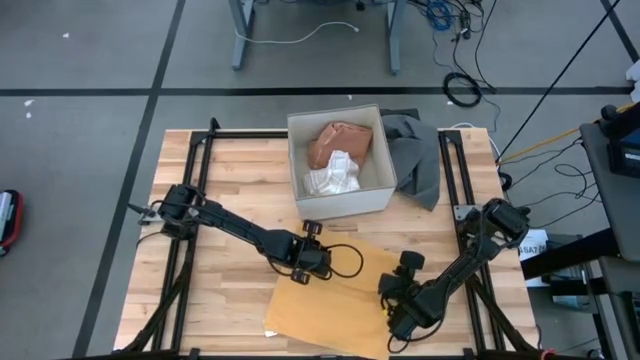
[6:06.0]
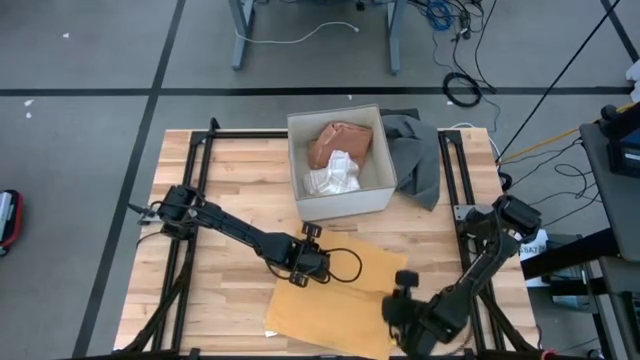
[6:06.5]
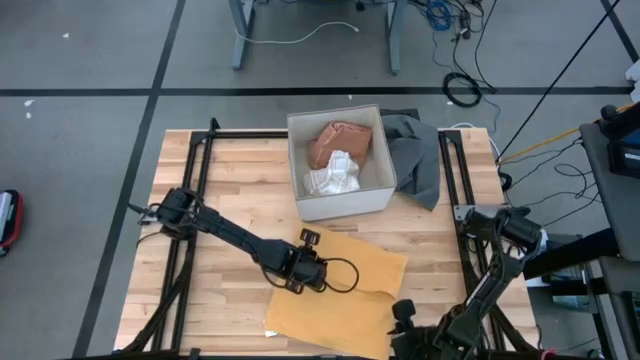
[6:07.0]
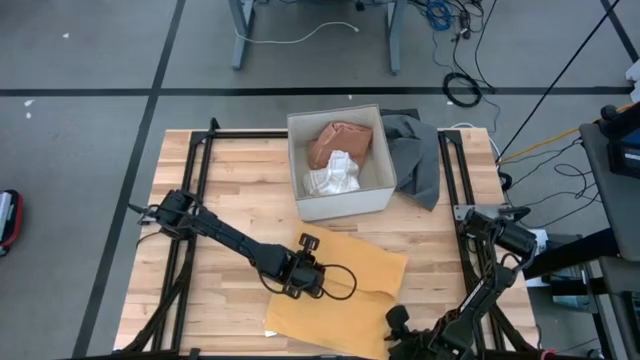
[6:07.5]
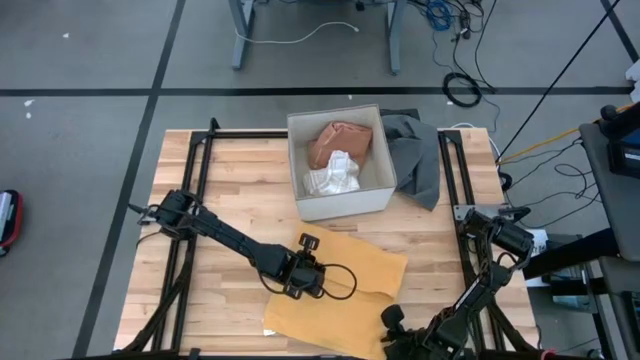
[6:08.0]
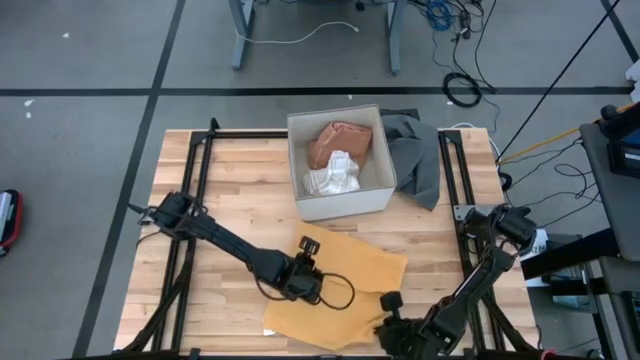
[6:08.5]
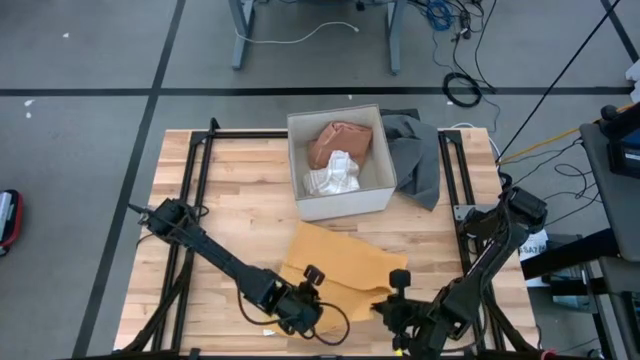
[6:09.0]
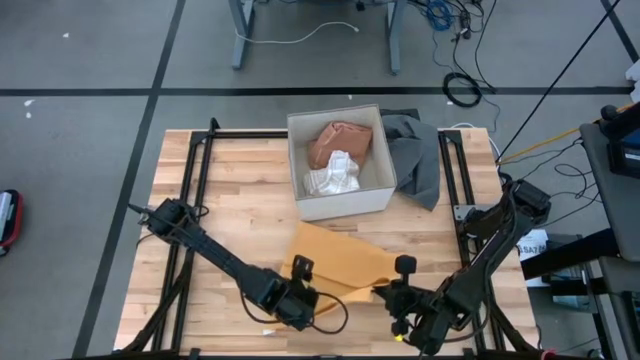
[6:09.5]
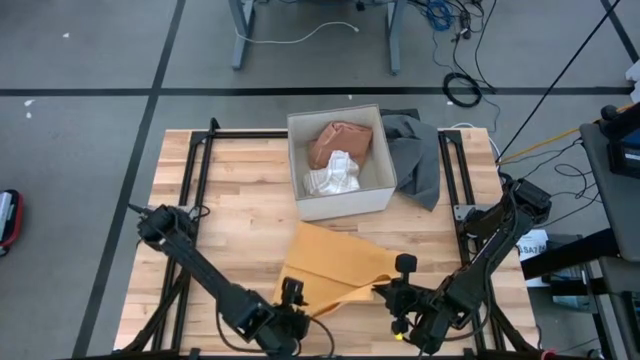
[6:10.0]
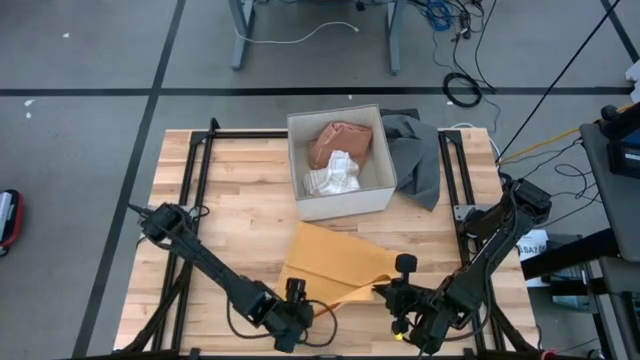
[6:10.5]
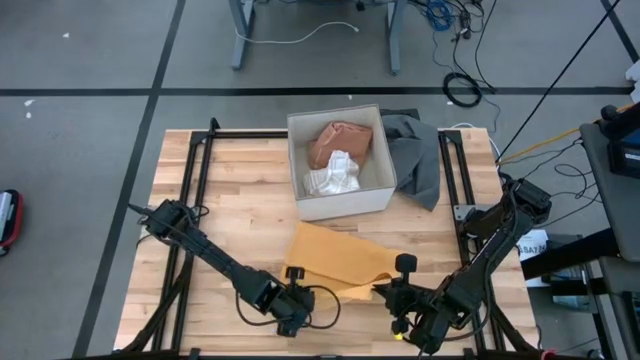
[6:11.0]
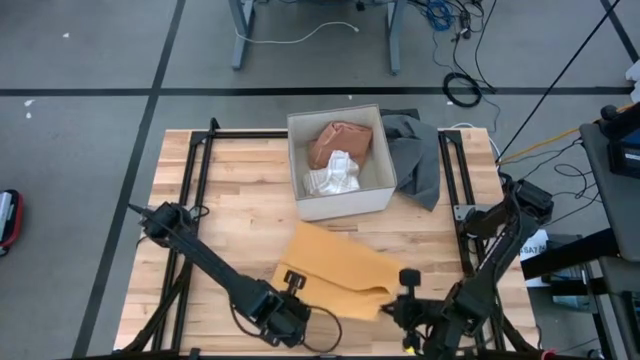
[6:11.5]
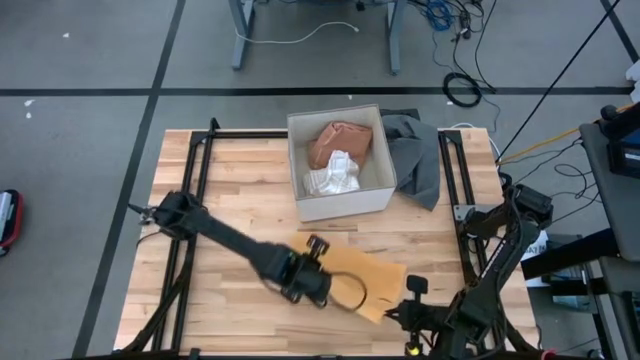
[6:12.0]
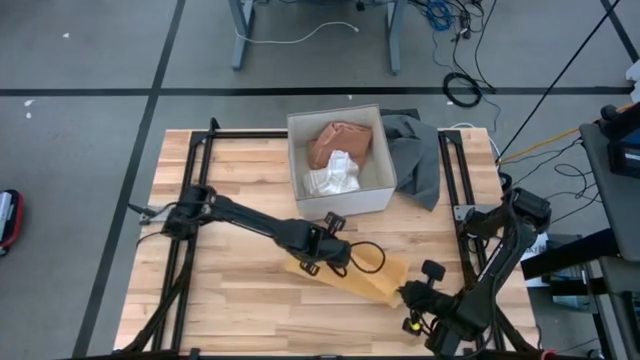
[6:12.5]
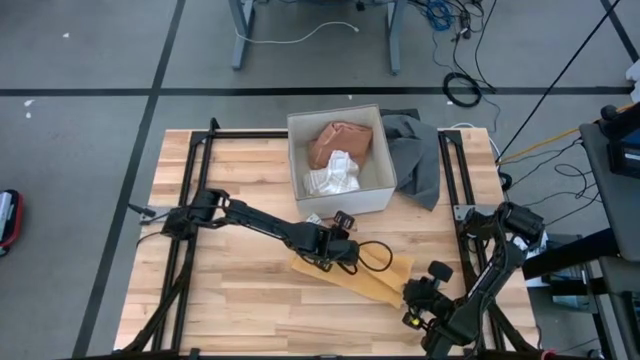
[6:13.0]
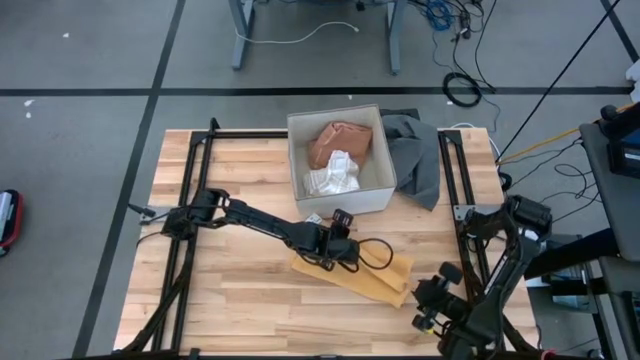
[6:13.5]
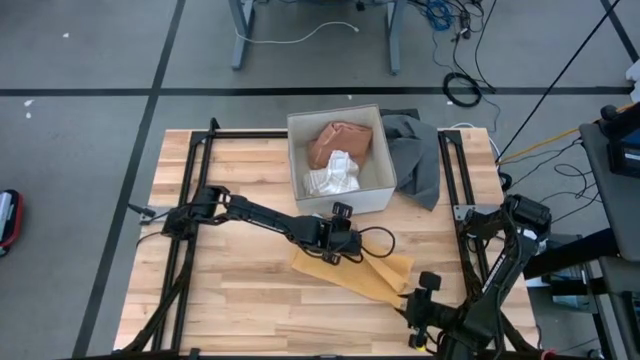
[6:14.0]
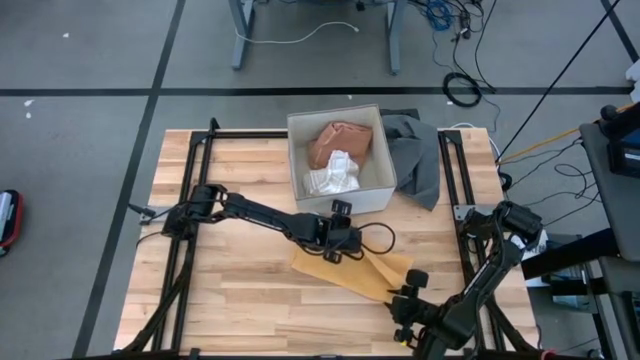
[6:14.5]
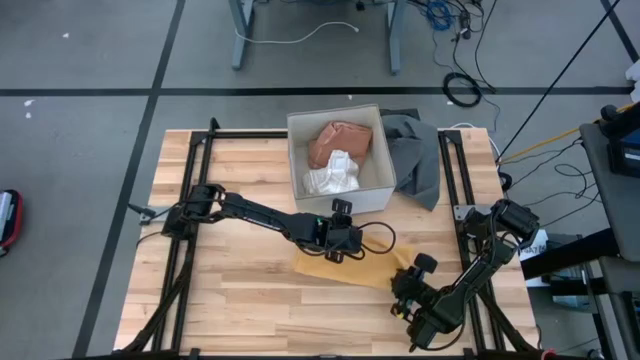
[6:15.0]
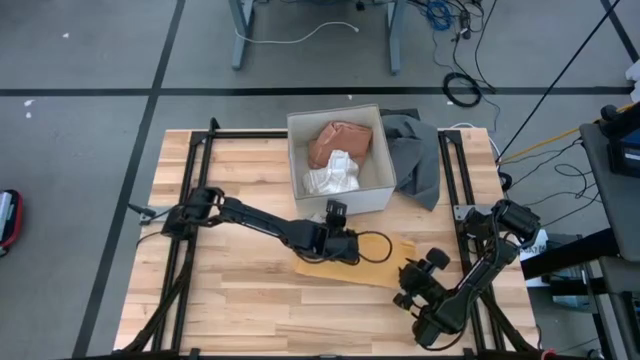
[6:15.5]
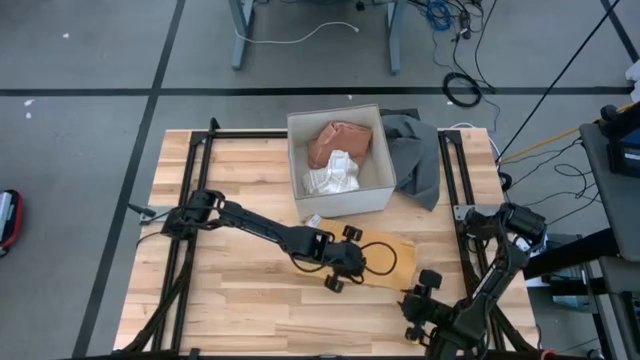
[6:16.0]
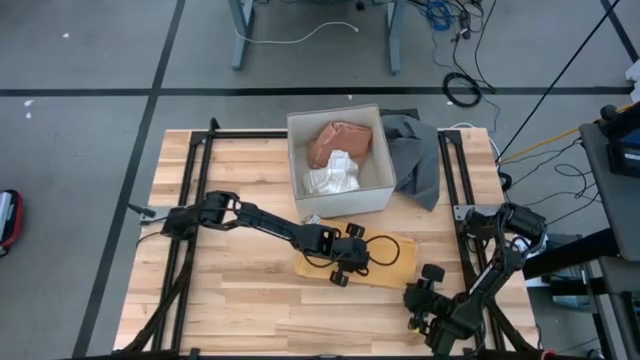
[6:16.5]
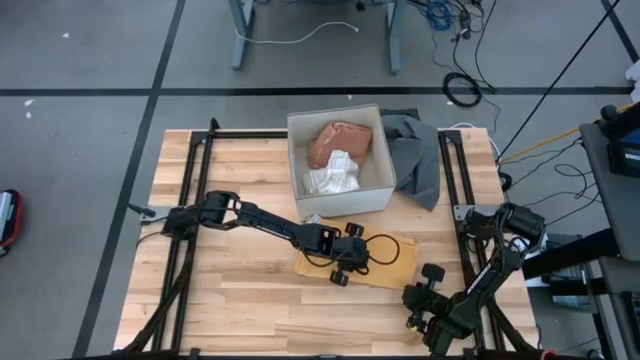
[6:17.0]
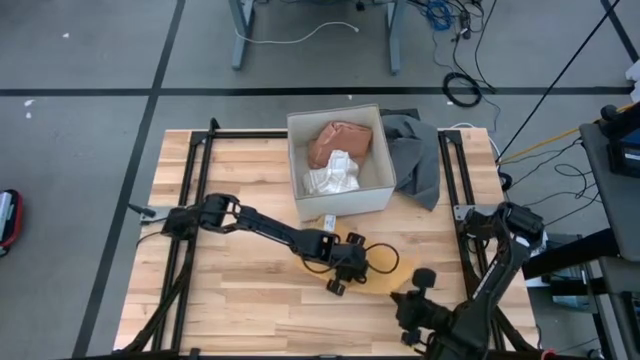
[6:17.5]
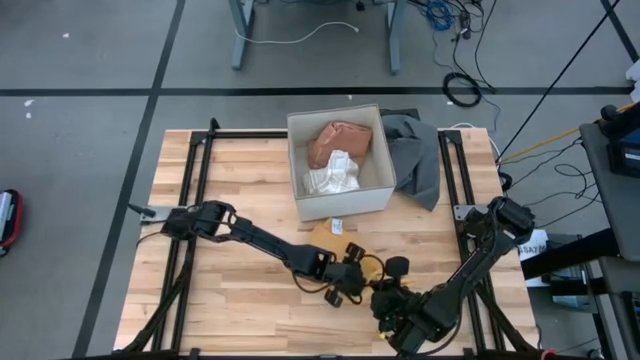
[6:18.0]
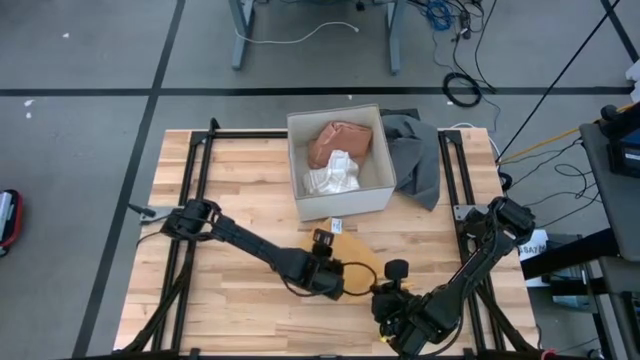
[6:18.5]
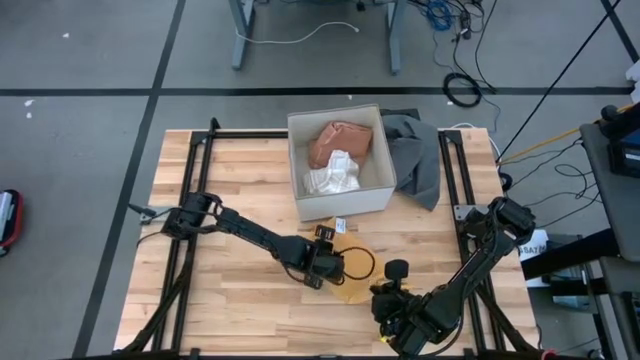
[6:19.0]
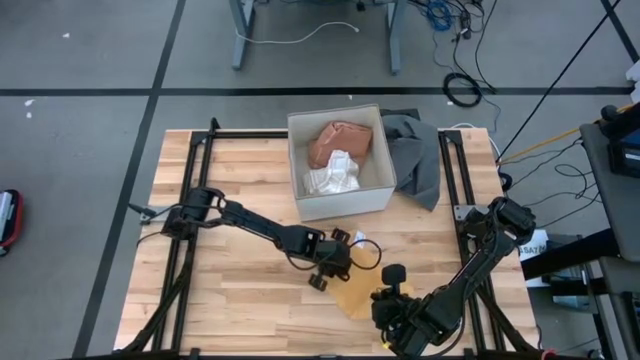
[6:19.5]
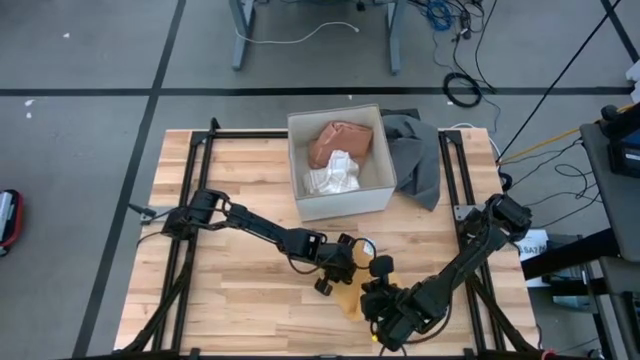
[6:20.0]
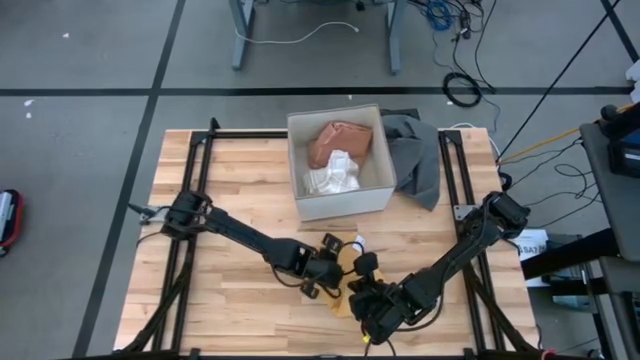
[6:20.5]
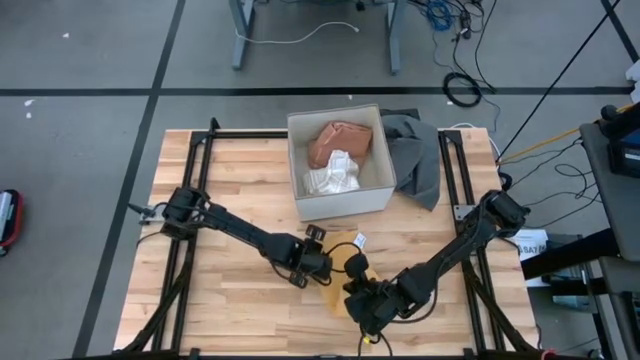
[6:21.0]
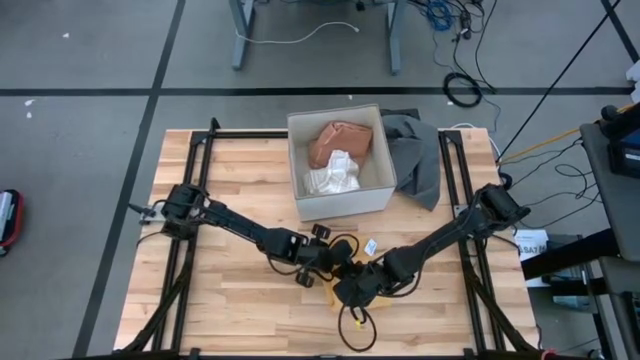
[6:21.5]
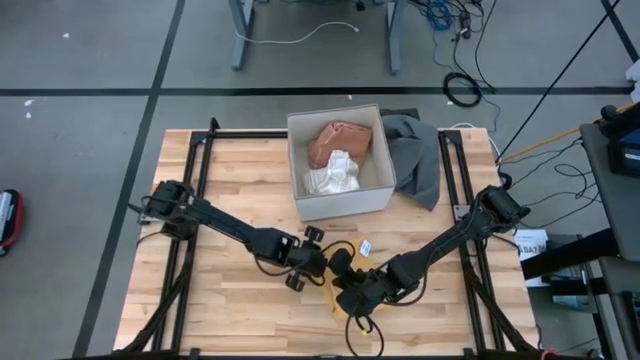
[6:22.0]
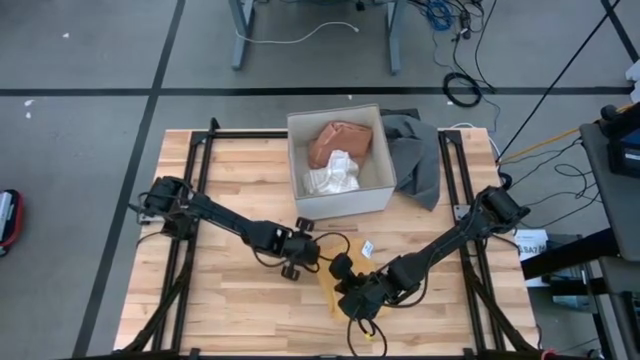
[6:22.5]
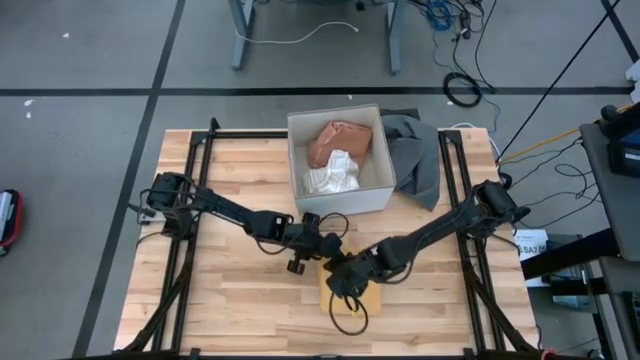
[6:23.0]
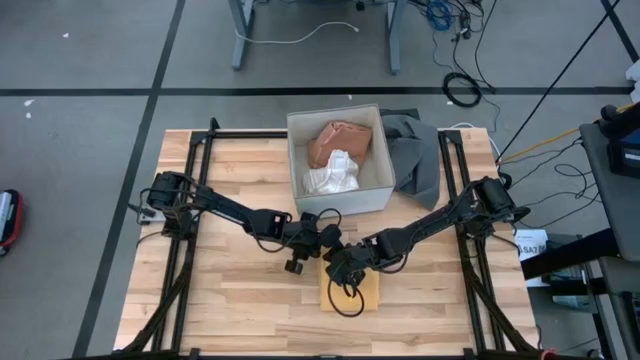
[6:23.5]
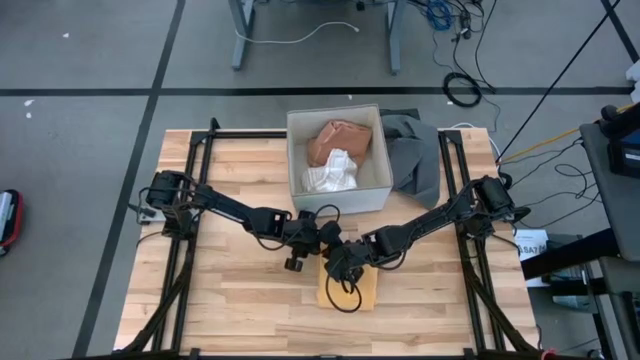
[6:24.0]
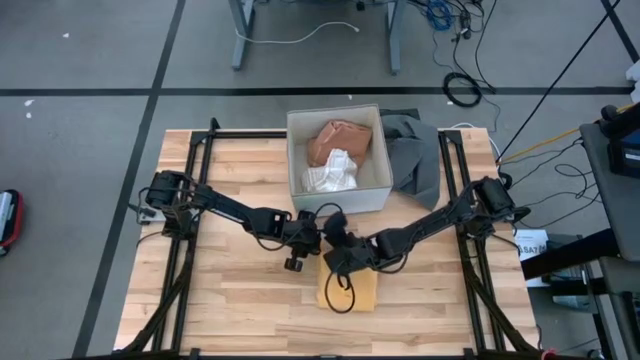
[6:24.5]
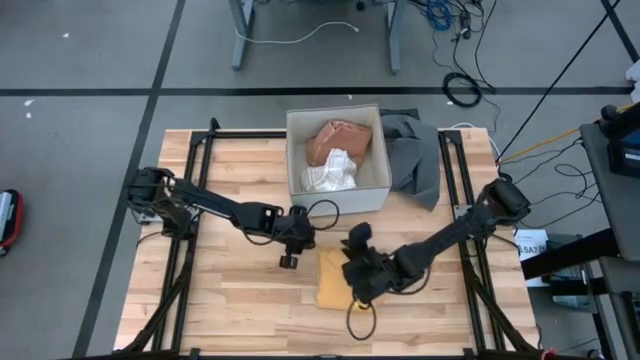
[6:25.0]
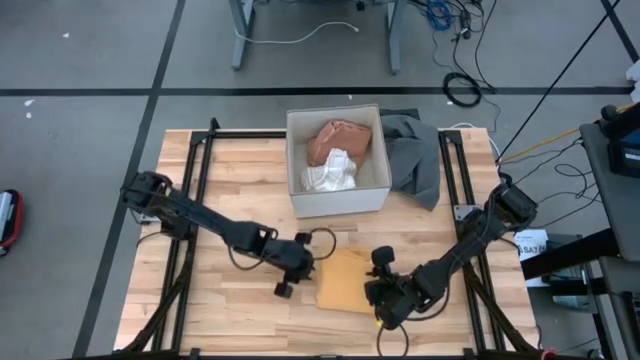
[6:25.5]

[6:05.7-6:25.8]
Task: Fold towel
Fold the orange towel
